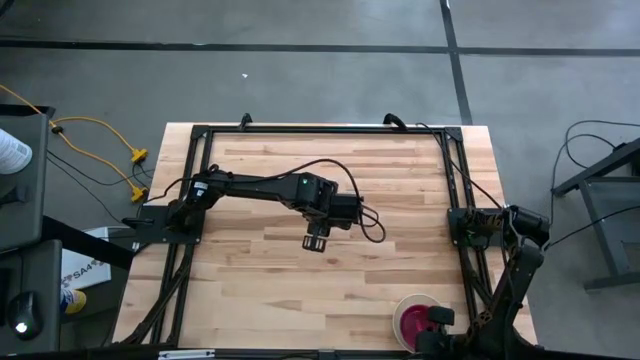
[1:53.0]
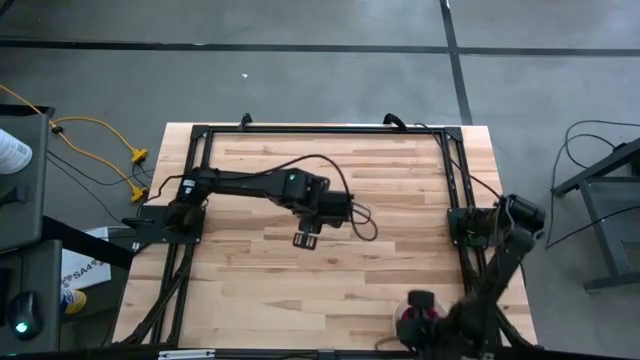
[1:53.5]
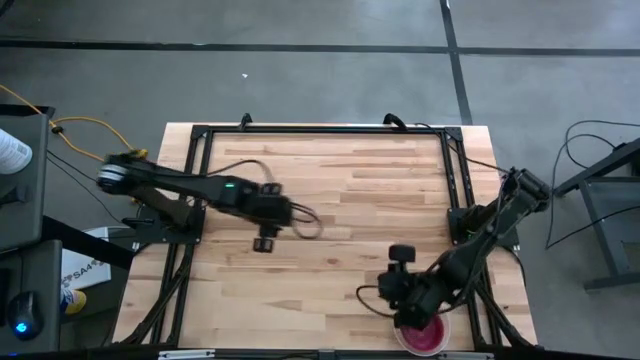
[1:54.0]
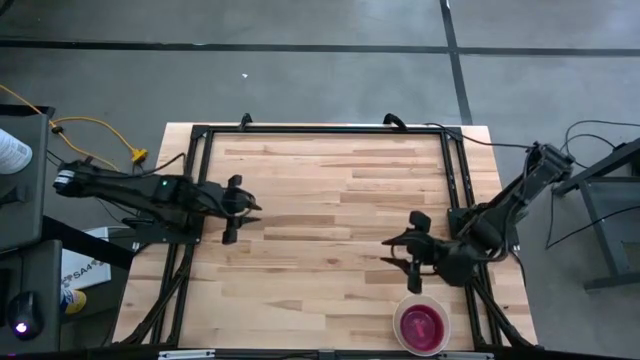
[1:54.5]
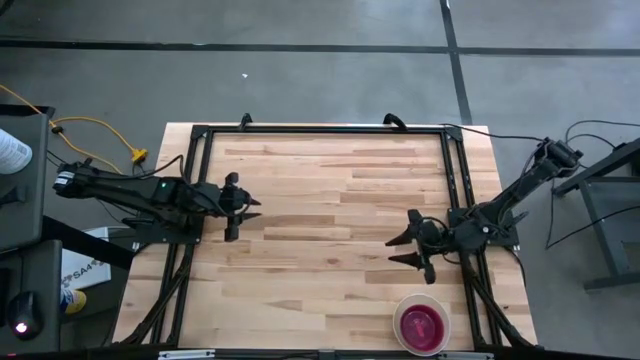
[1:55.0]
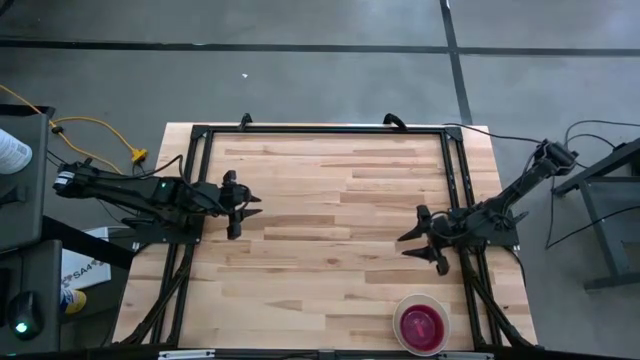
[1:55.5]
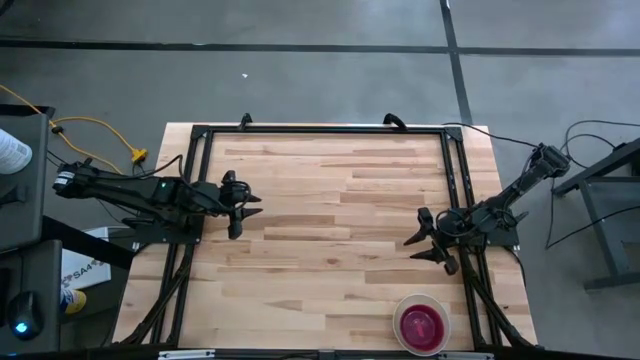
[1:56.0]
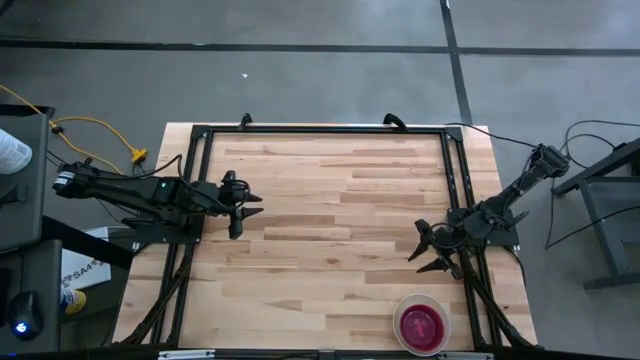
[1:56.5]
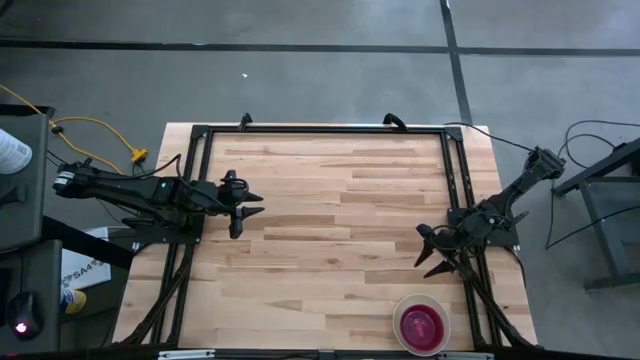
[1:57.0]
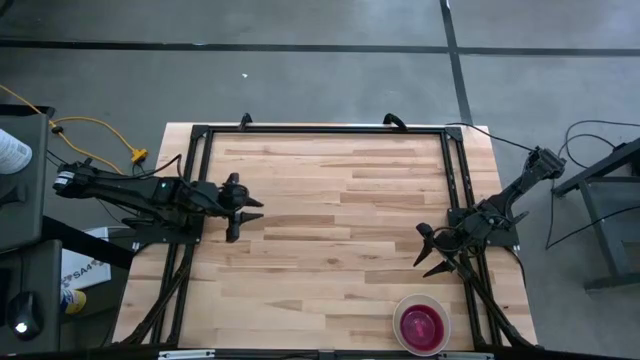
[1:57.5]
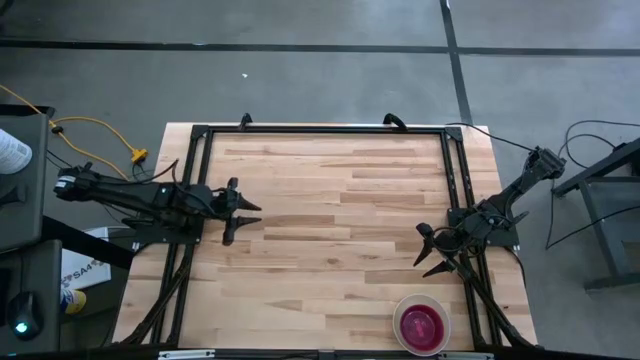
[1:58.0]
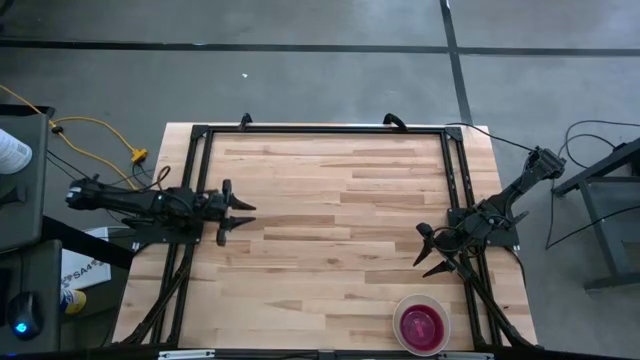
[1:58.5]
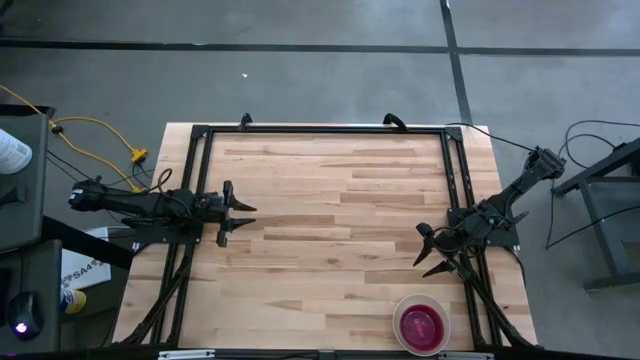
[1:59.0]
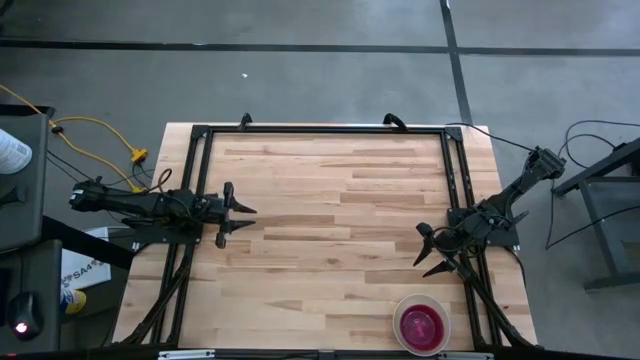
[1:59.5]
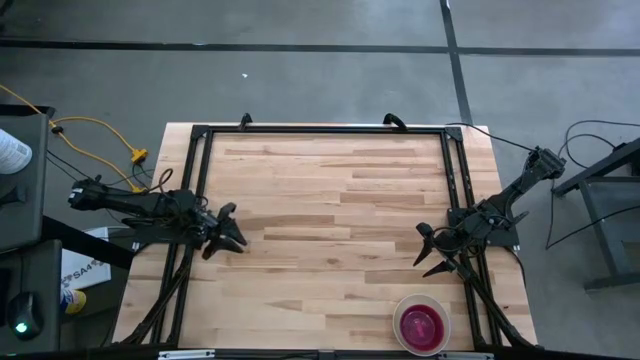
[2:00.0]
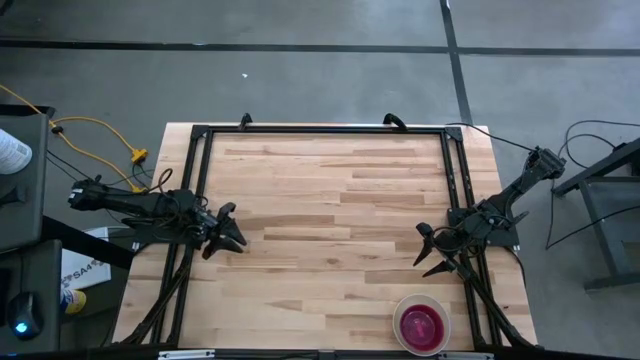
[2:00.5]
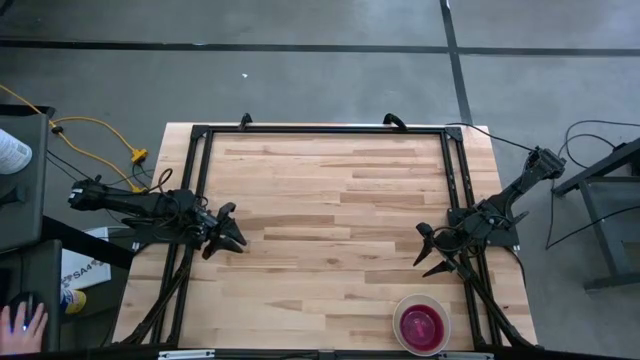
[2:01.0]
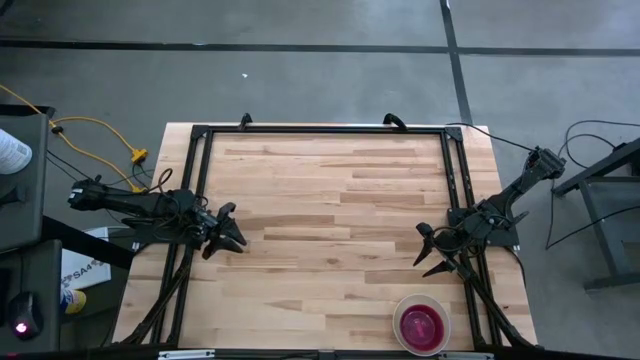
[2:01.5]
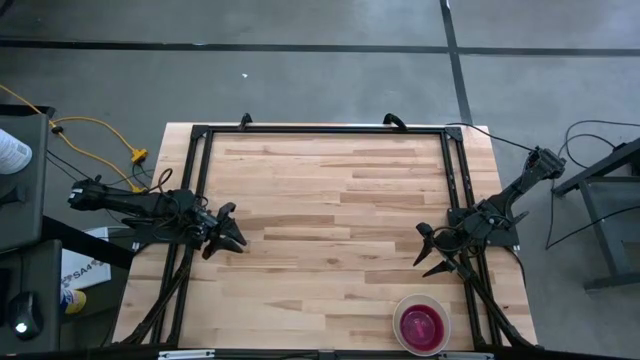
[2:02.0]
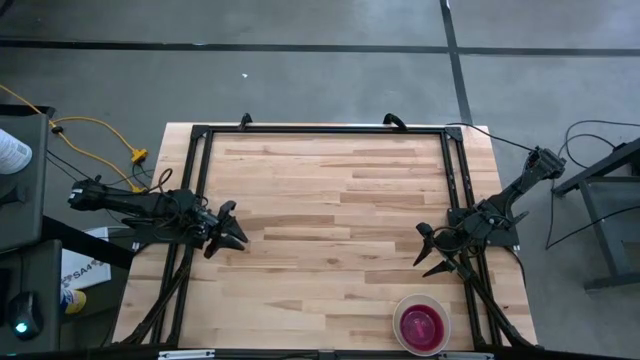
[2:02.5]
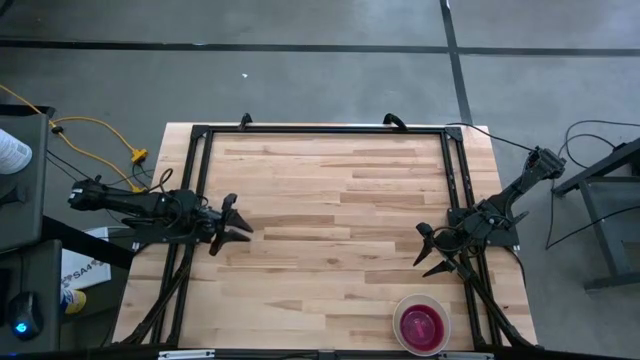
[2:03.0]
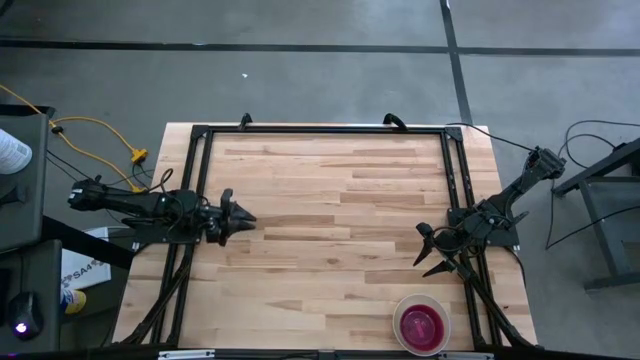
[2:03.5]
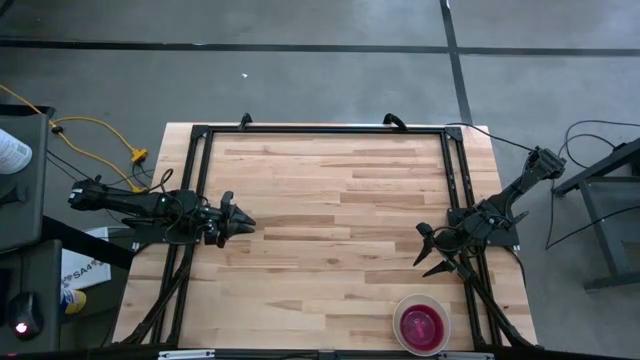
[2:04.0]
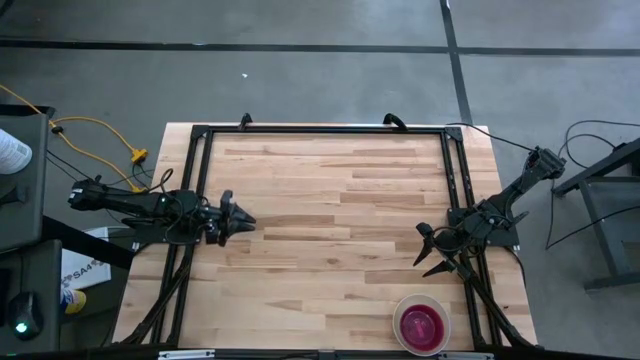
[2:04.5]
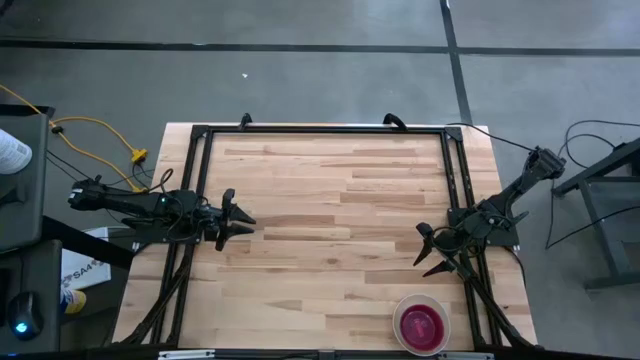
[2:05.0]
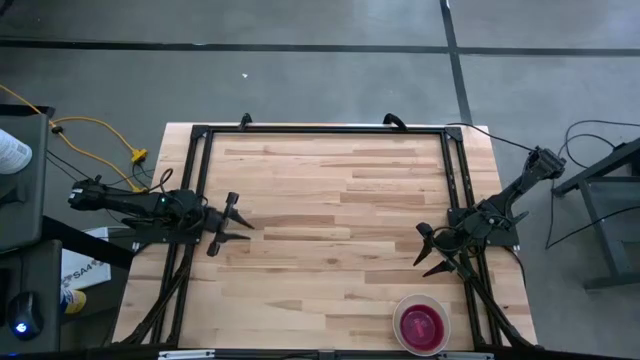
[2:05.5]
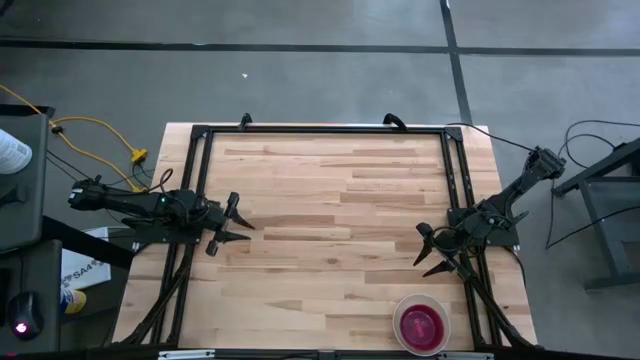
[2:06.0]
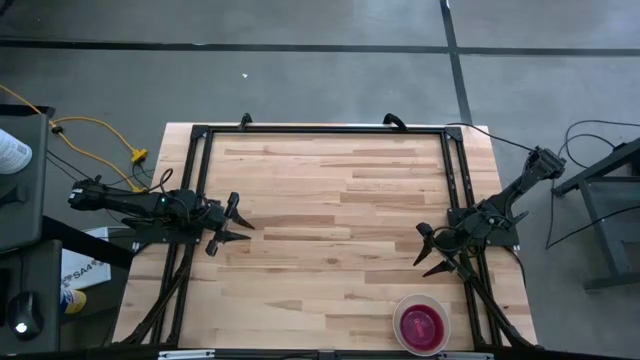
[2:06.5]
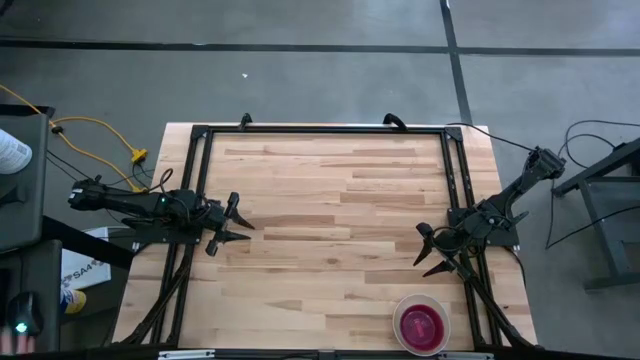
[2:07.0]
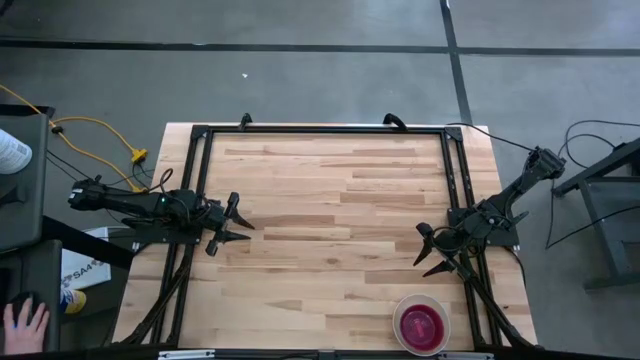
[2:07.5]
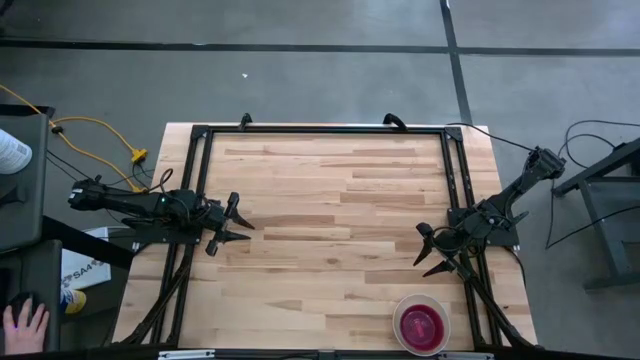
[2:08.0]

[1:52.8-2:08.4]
Return to Home Position
